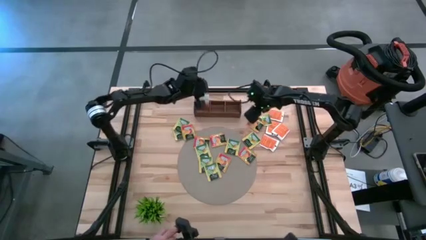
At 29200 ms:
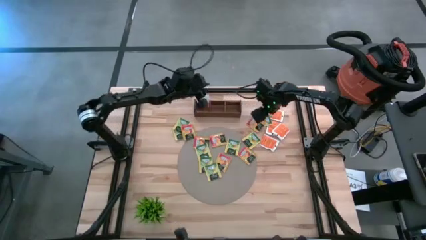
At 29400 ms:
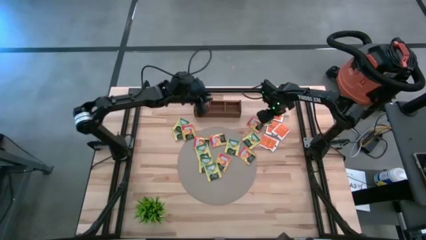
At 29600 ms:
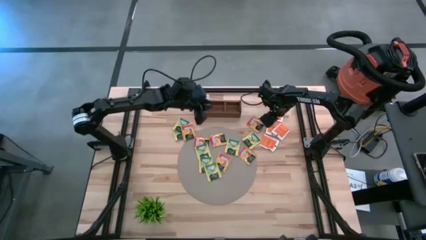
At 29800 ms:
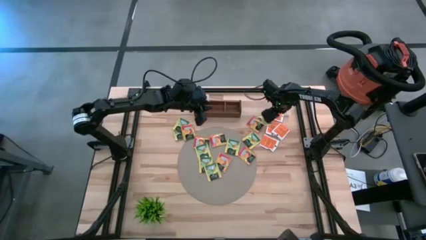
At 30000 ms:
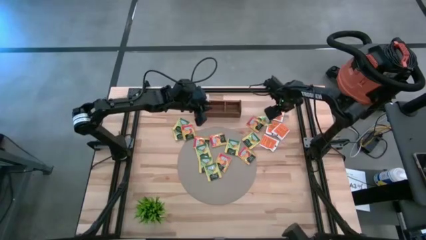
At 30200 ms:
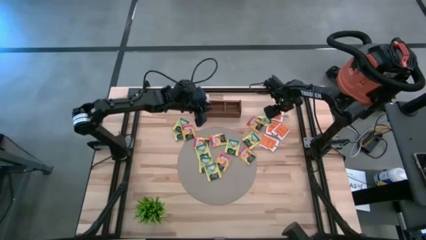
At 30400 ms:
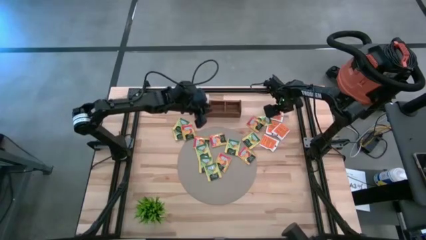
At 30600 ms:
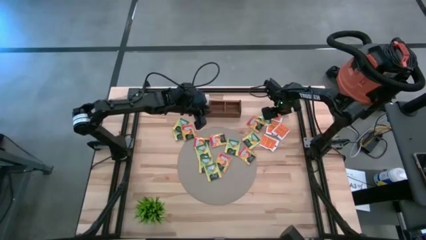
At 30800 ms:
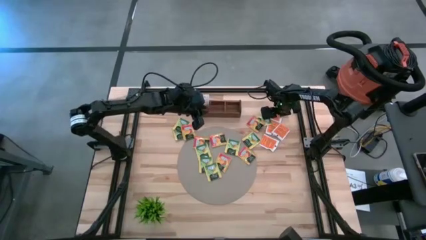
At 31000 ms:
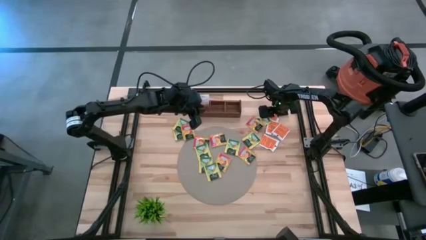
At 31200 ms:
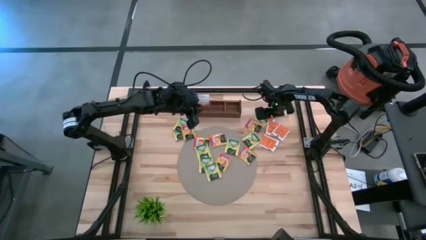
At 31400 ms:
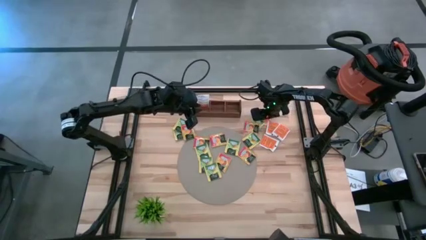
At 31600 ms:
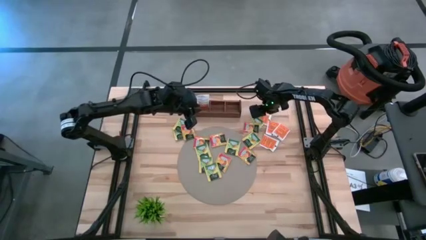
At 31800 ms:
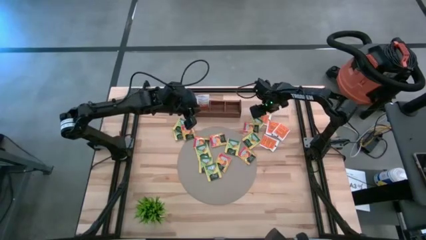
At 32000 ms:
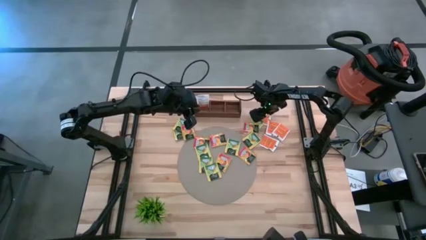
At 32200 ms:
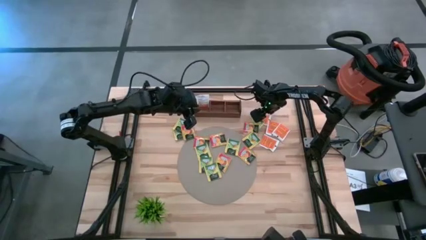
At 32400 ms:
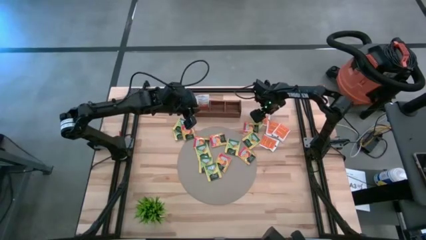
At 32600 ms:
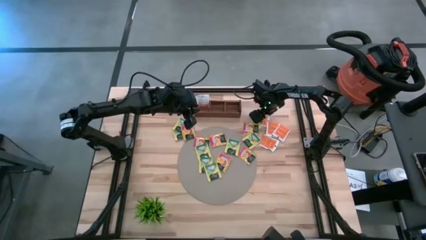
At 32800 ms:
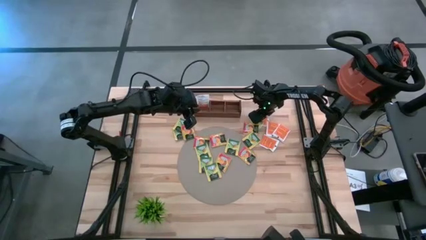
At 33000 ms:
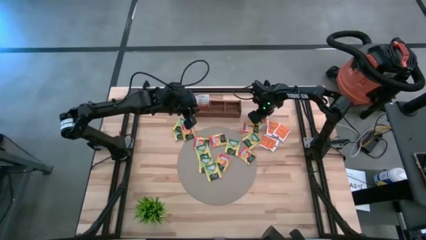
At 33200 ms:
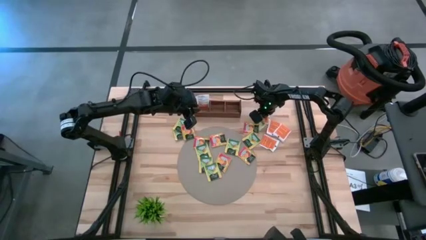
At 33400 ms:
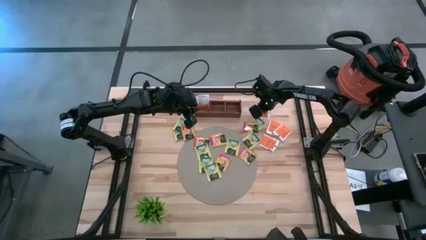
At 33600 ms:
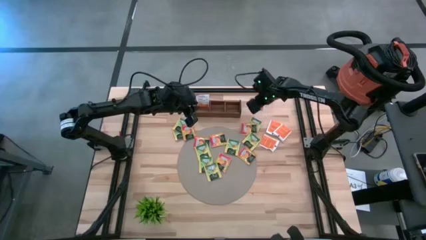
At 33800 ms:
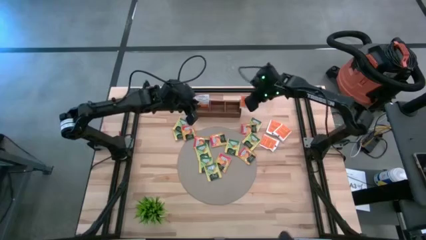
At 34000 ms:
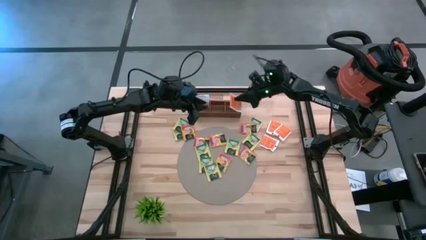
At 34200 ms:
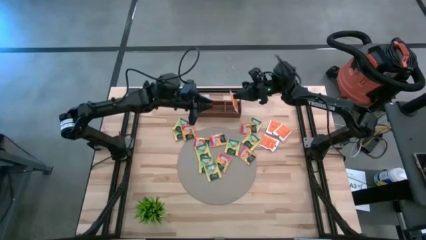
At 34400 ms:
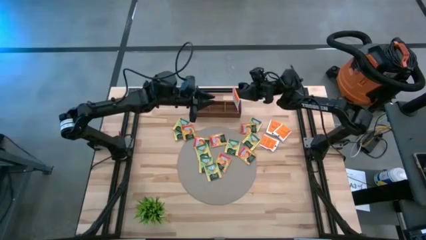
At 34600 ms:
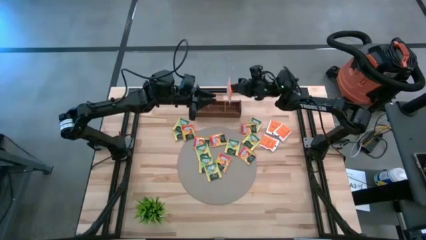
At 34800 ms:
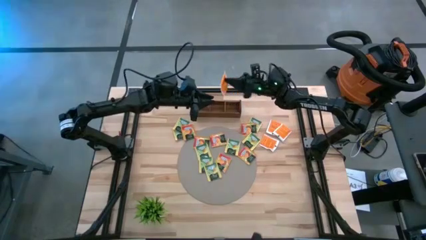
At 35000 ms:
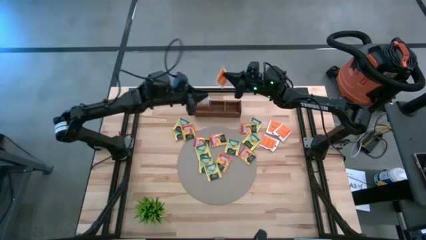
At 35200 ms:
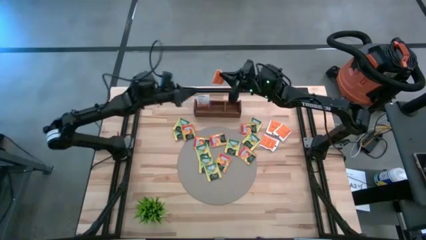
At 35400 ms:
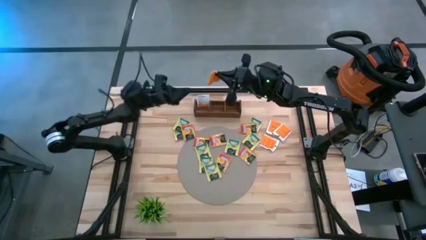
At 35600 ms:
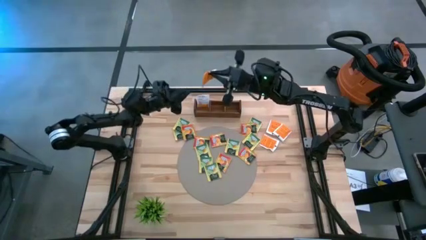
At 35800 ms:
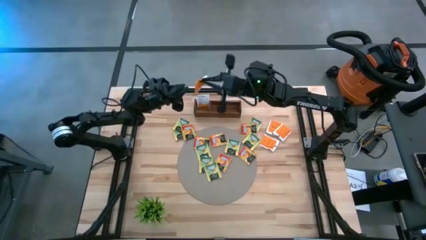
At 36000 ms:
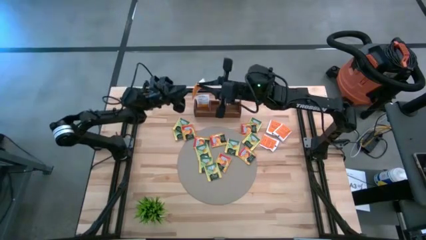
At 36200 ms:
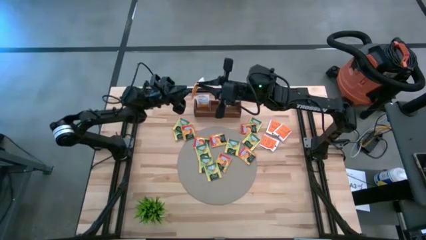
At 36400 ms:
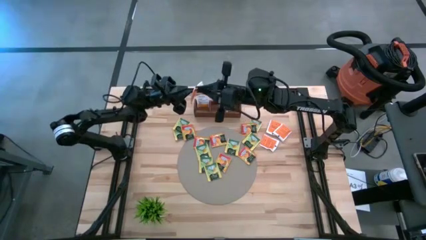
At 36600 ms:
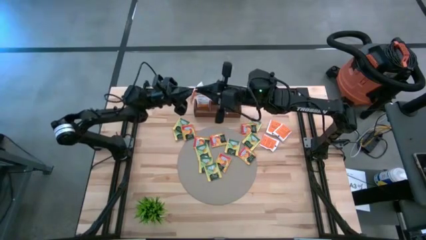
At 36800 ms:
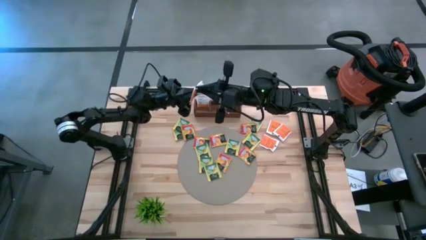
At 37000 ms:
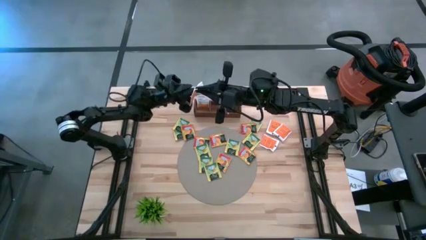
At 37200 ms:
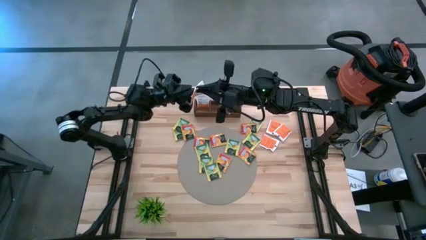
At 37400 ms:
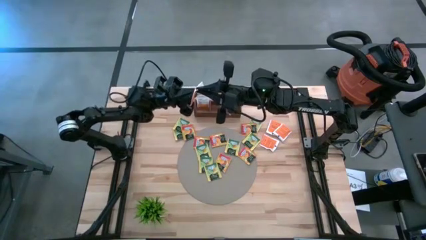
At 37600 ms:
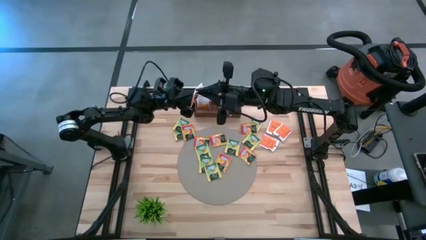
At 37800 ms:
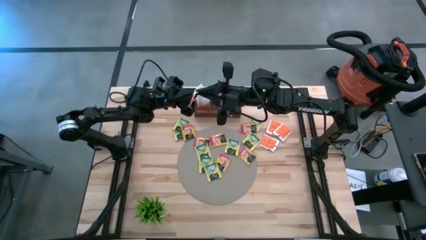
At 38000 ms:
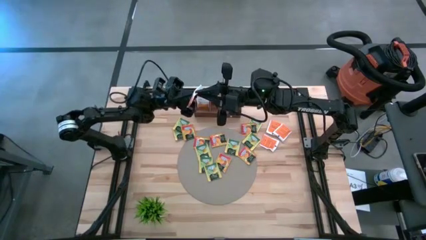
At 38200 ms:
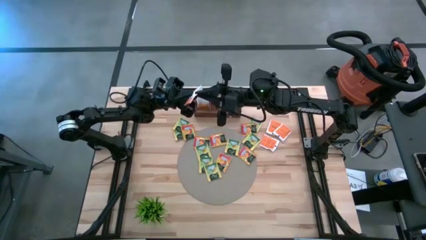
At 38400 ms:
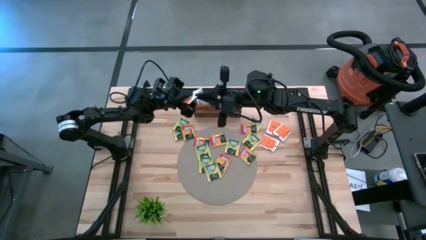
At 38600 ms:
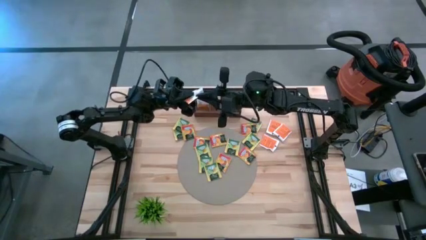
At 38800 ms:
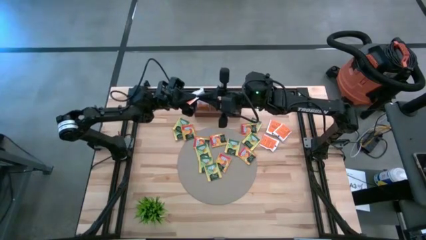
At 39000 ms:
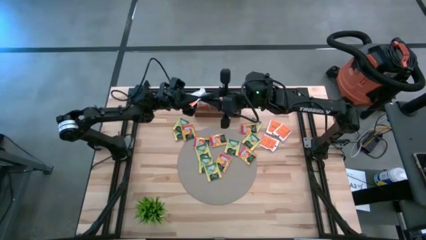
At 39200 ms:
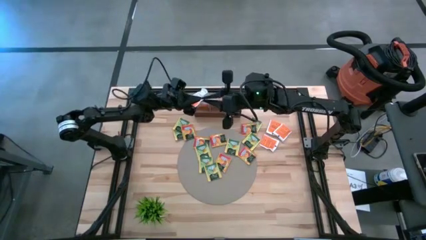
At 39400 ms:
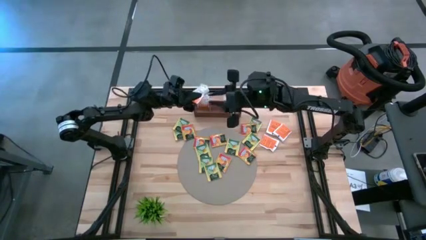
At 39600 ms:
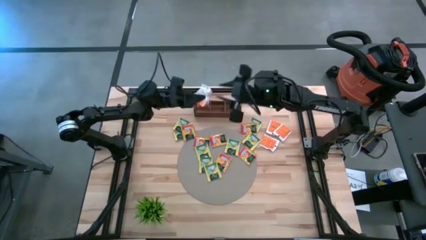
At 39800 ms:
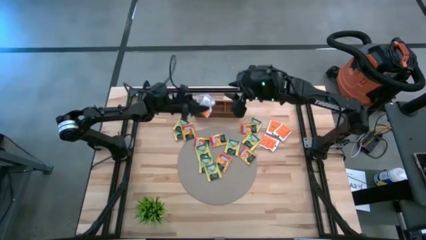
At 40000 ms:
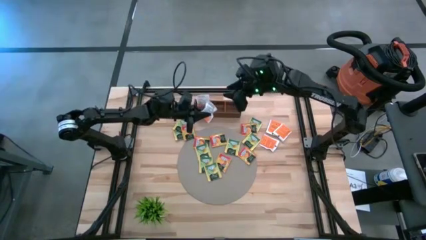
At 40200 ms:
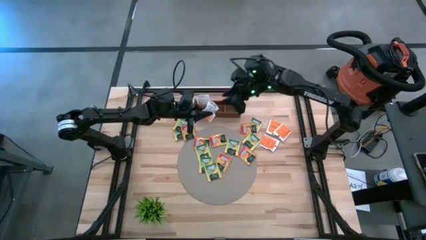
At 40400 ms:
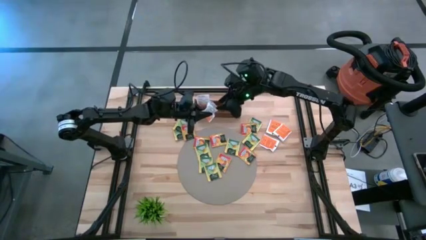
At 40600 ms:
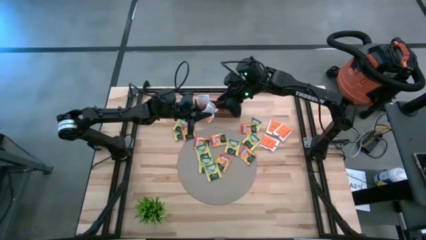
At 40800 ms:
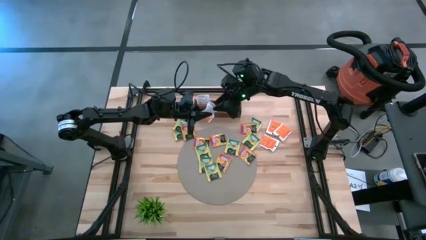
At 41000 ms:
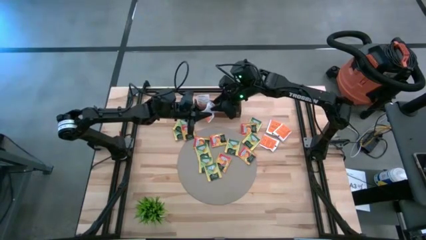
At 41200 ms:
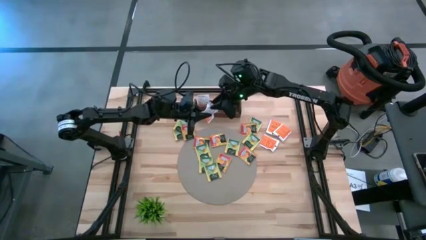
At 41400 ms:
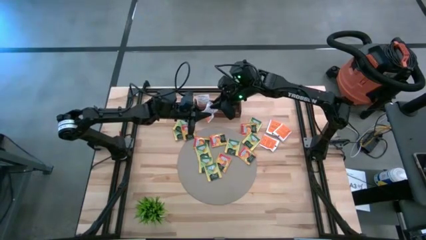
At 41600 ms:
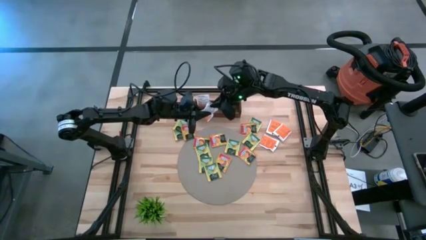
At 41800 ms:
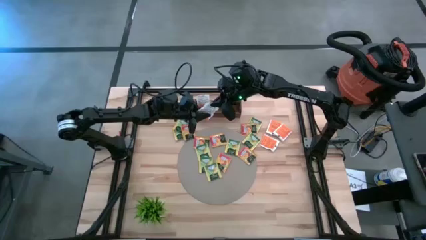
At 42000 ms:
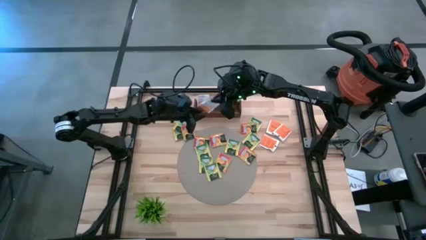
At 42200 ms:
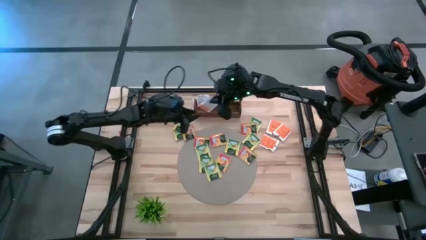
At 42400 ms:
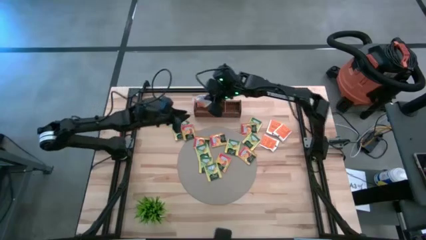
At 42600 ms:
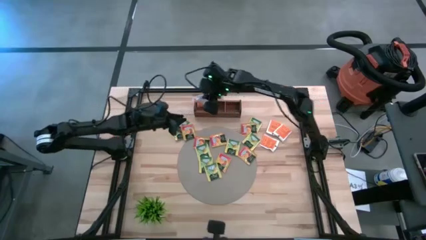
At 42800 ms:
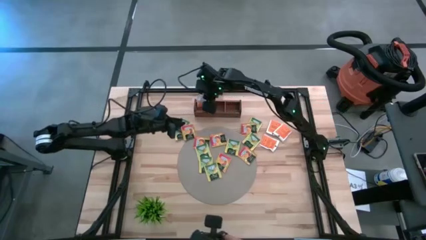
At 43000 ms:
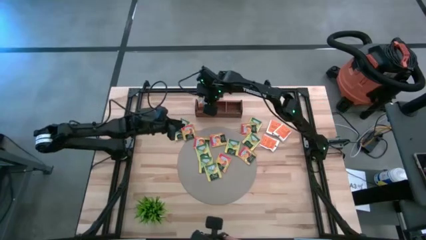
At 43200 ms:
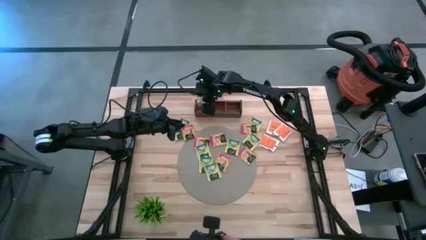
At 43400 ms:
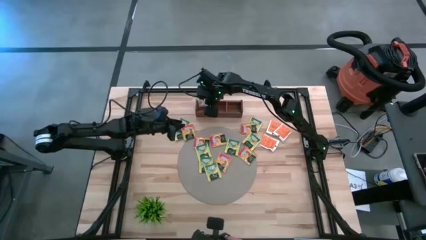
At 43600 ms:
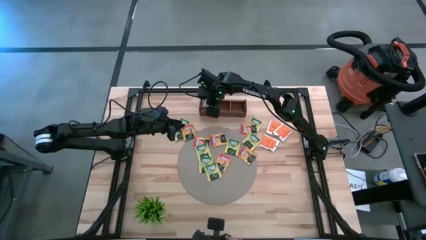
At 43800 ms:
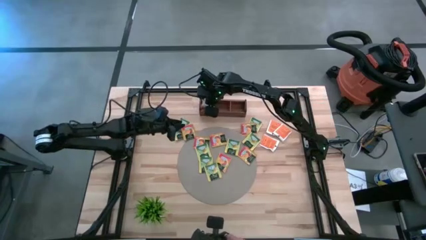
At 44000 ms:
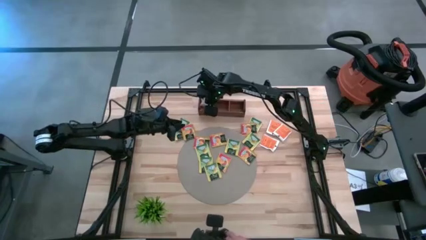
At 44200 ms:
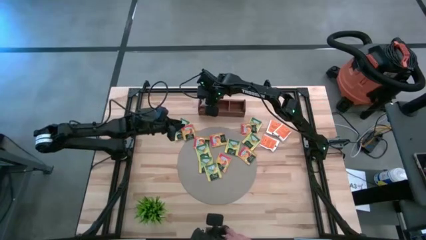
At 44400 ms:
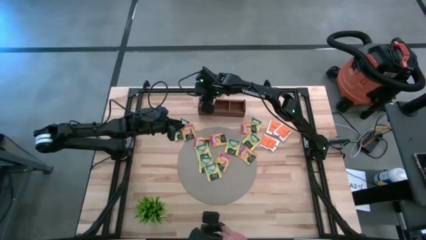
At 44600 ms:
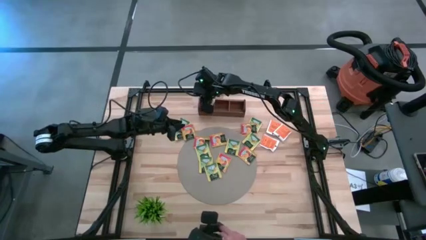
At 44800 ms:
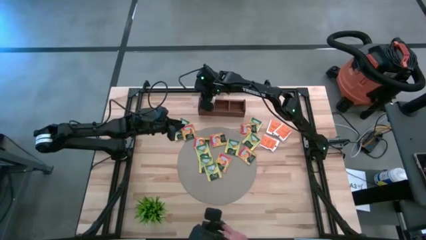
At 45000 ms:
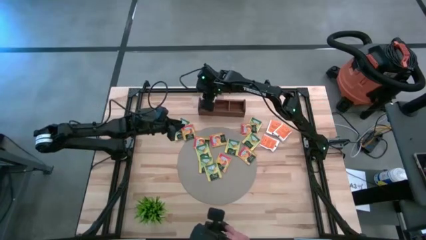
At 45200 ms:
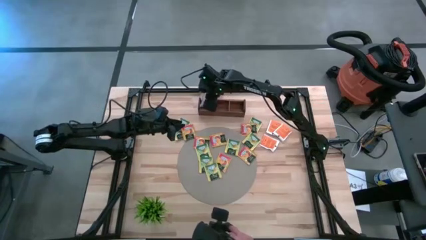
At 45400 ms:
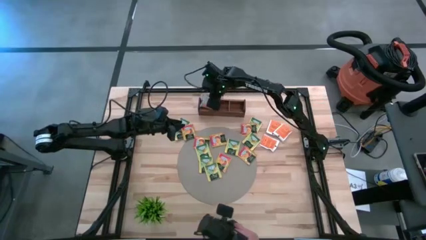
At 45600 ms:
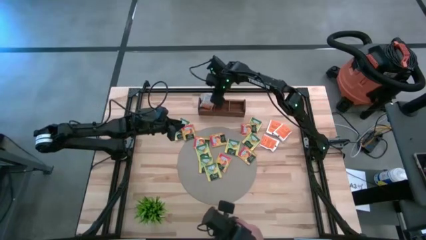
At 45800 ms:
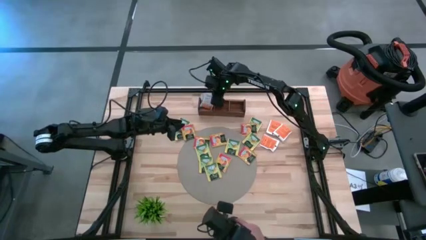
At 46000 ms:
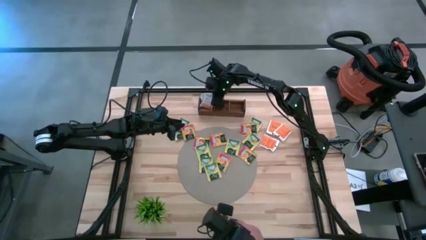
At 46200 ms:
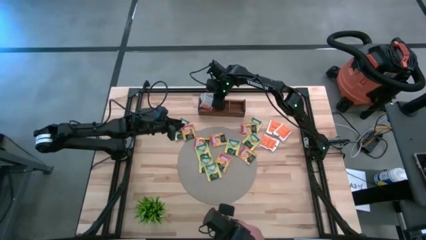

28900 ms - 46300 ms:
Task: Pick & Place Tea
Put the white tea bag into the left section of the wooden organizer
